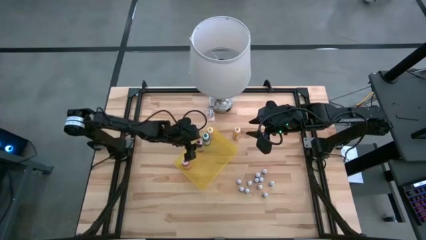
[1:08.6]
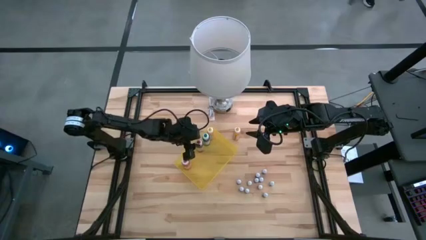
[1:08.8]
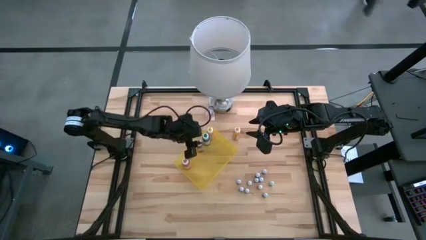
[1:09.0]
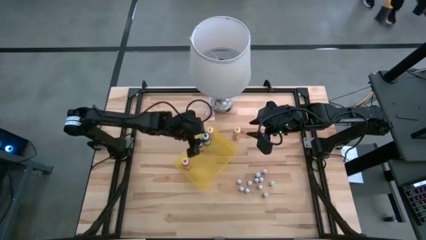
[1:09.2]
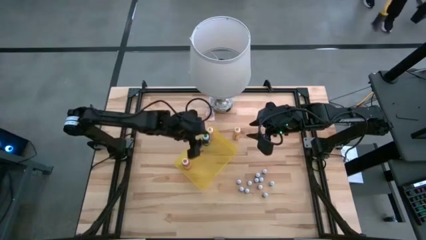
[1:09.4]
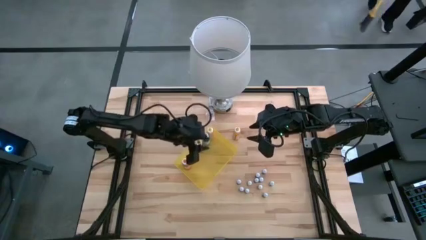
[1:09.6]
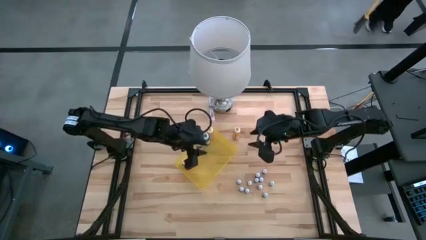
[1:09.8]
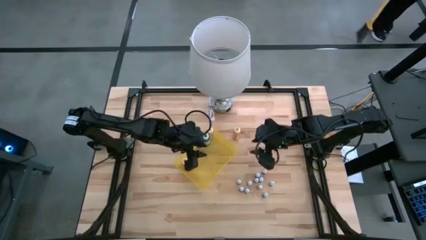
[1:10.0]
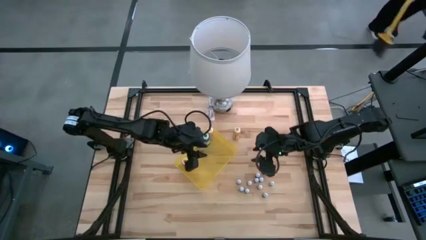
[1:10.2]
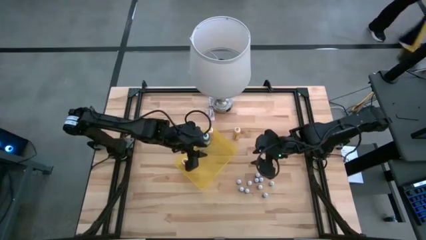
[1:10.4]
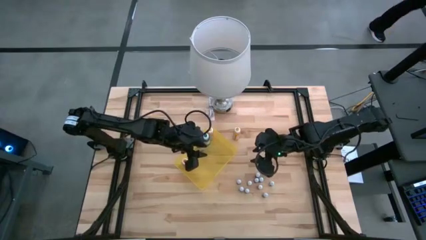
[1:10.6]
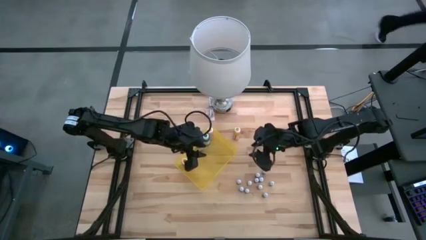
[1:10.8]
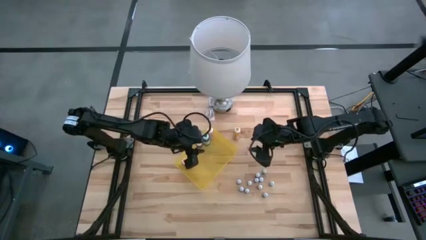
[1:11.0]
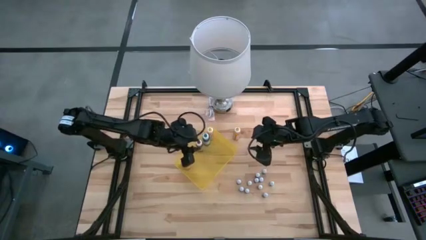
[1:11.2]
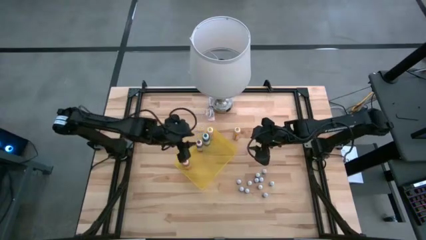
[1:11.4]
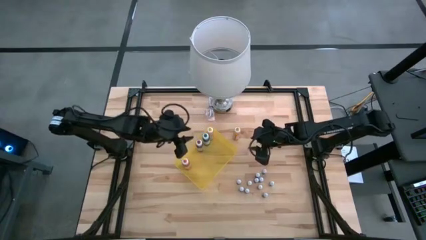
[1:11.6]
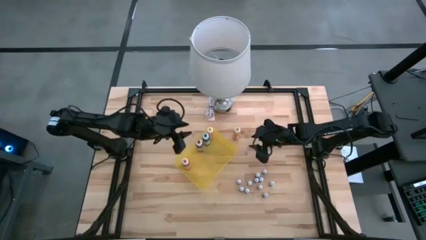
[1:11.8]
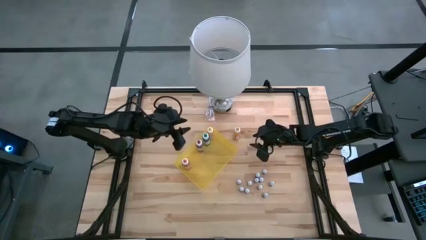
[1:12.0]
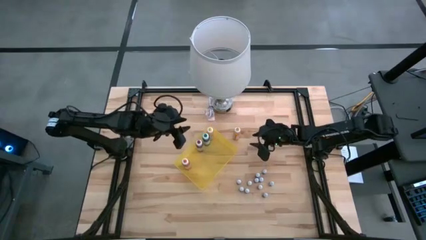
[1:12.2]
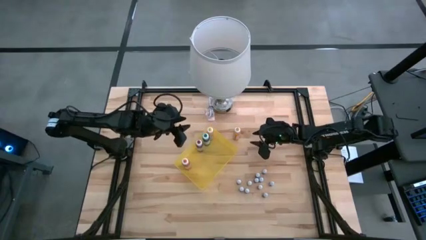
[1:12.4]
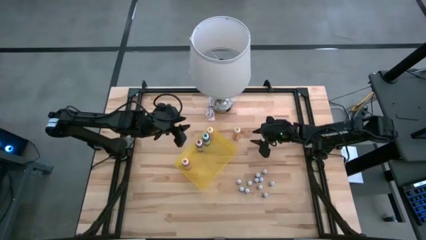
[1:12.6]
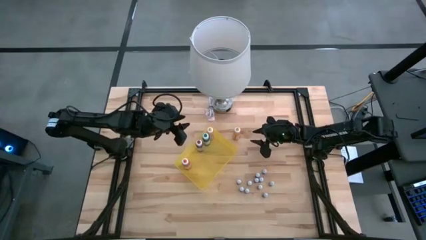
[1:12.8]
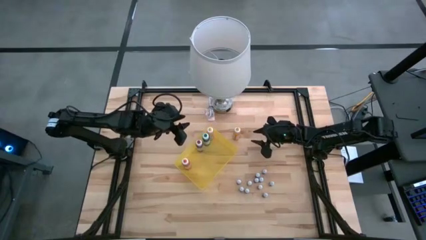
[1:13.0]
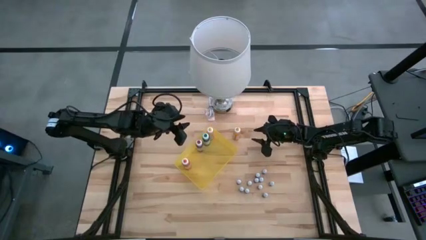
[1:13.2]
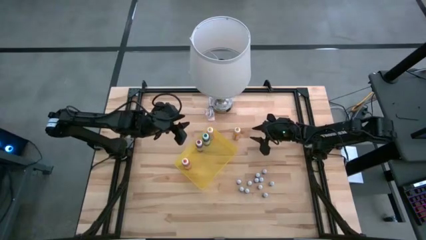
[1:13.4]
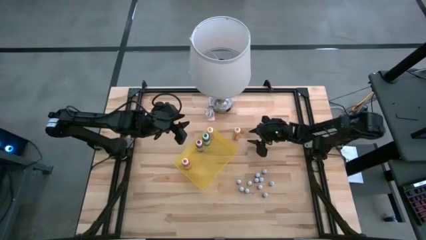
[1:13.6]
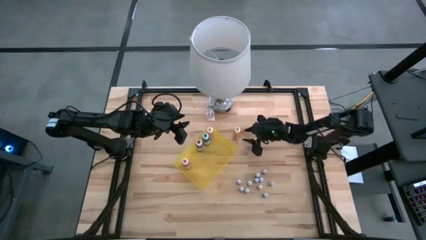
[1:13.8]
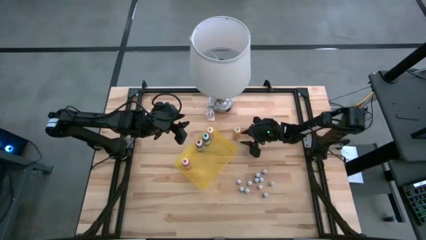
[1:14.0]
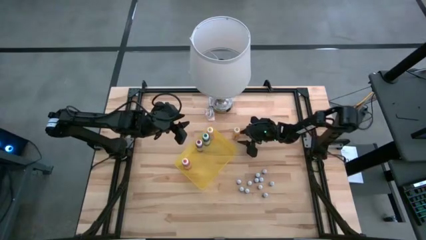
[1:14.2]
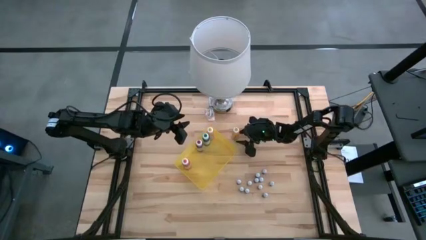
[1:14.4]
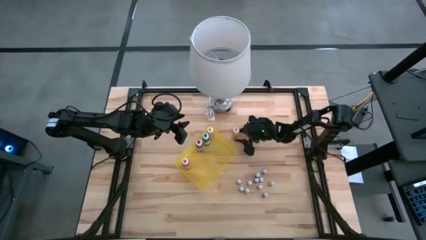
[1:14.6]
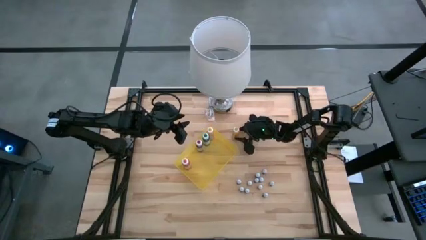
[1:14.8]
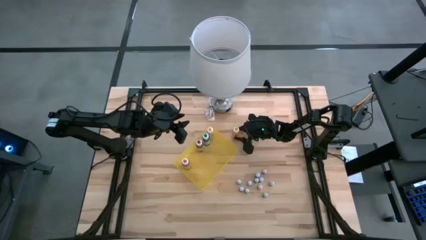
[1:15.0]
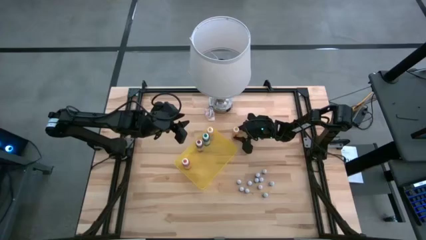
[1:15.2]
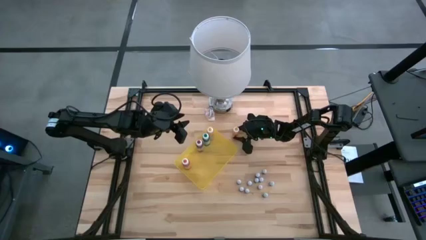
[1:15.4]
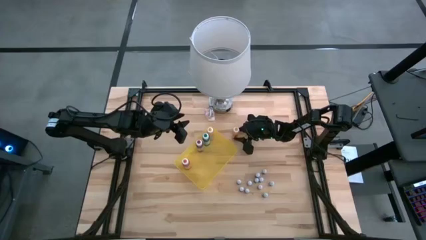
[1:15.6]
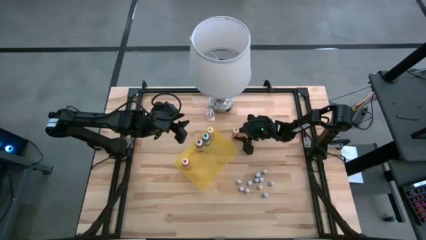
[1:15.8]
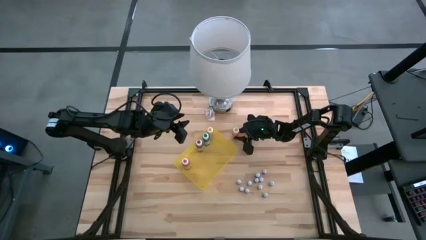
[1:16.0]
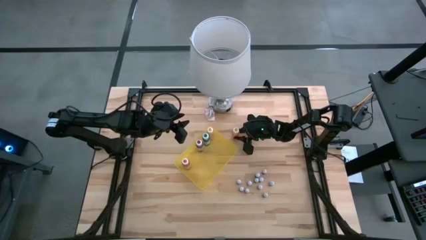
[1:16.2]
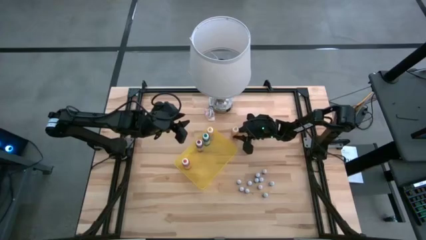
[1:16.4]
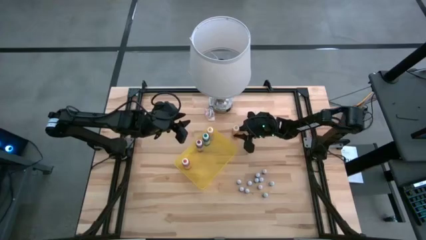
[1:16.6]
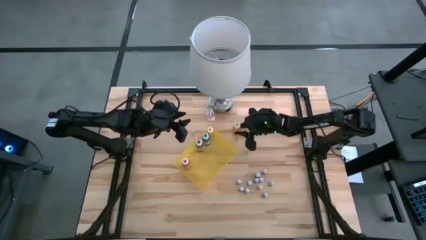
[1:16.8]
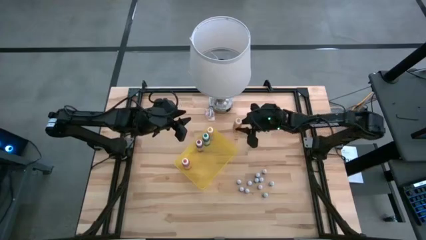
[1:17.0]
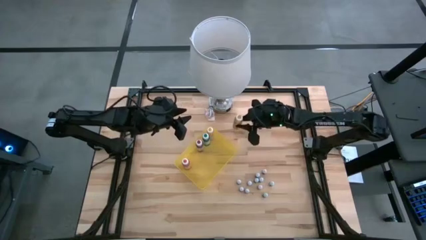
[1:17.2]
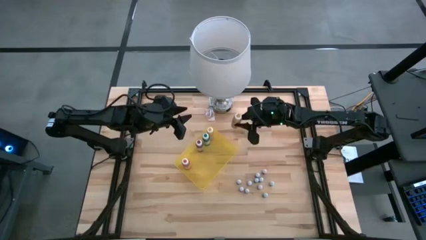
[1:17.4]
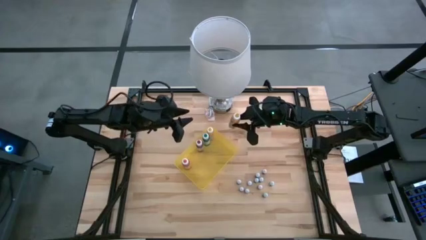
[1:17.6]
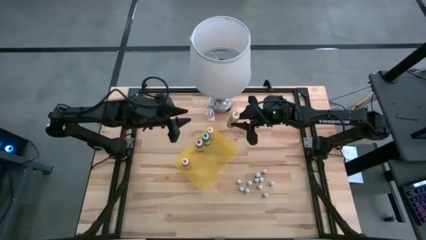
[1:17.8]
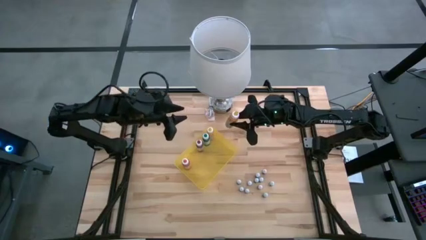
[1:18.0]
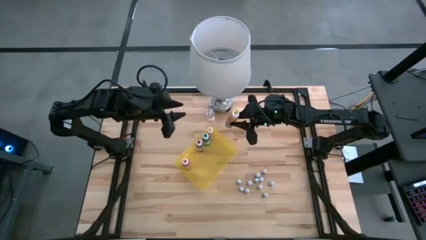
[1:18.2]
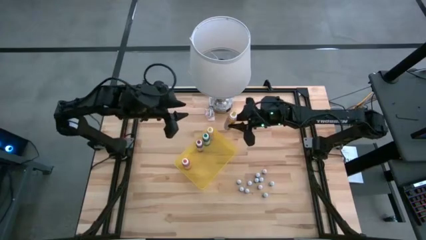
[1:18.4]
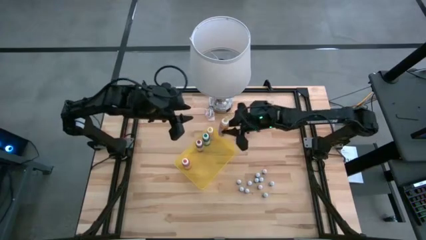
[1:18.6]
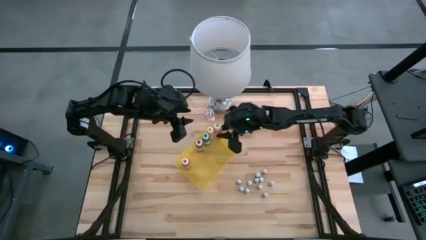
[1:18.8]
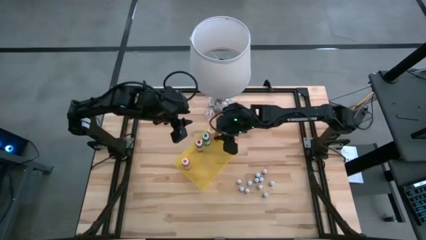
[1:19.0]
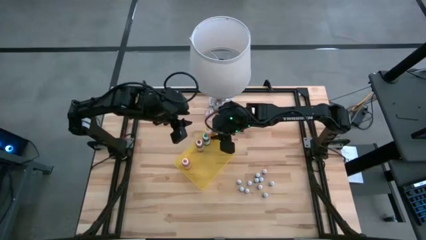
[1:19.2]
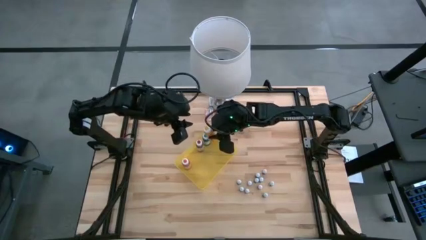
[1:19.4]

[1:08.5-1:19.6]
Task: Pick & Place food coloring
Put the large yellow food coloring bottle into the yellow bin

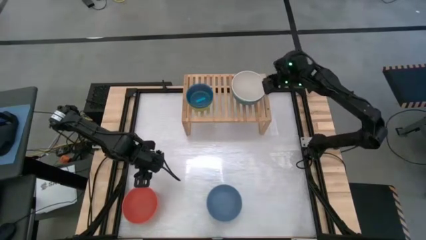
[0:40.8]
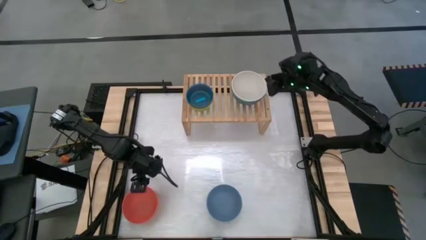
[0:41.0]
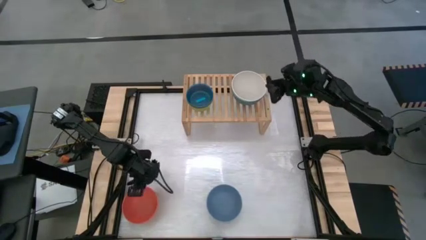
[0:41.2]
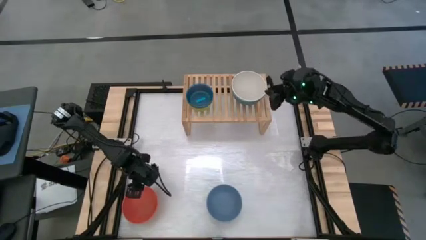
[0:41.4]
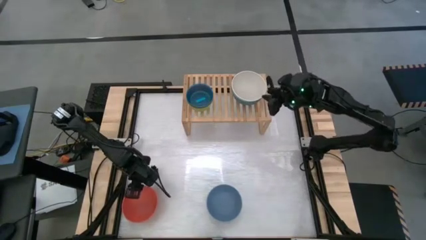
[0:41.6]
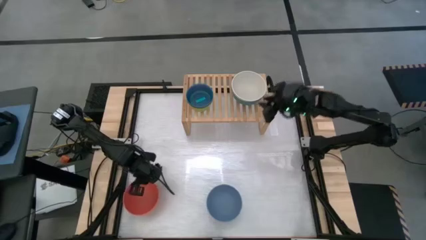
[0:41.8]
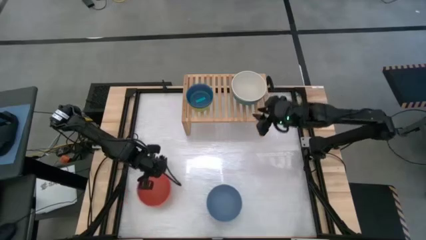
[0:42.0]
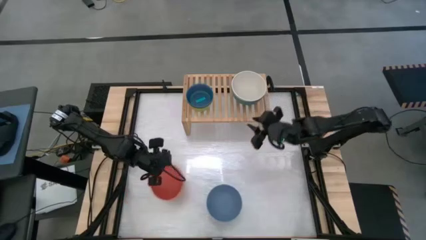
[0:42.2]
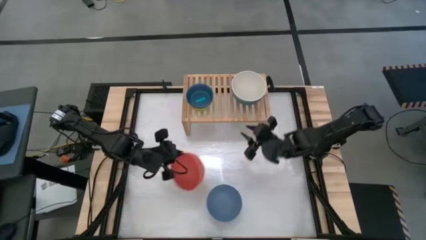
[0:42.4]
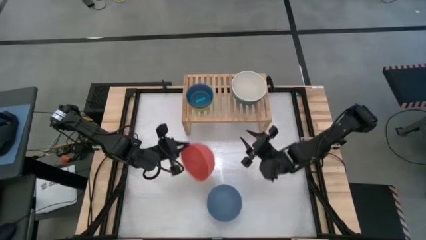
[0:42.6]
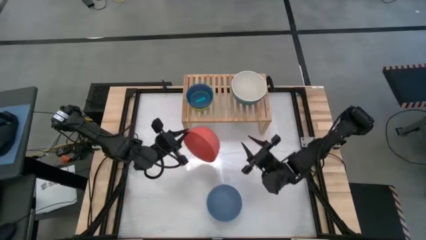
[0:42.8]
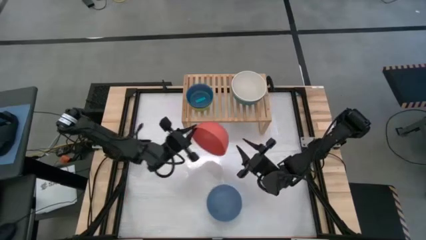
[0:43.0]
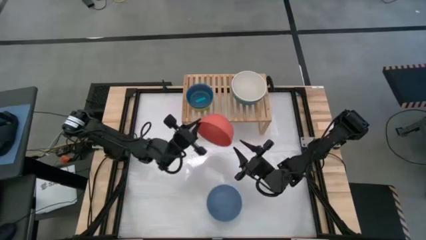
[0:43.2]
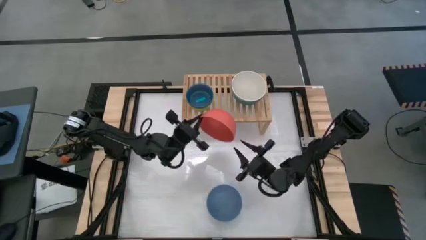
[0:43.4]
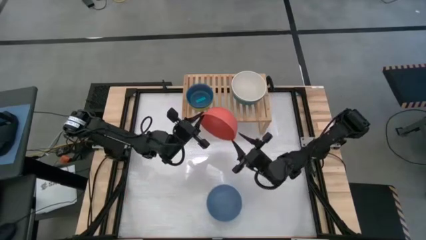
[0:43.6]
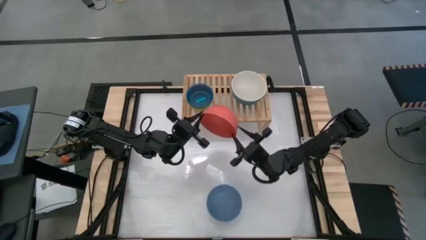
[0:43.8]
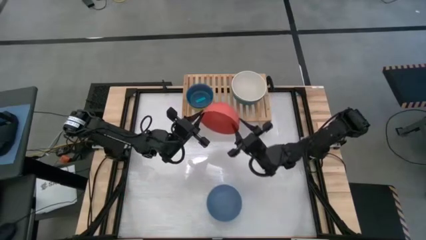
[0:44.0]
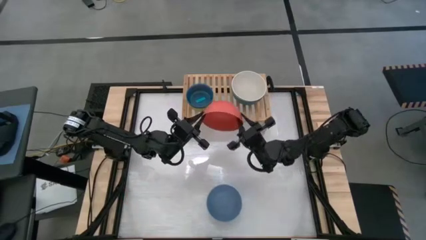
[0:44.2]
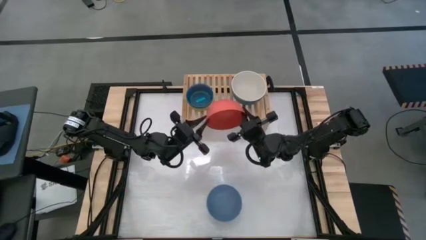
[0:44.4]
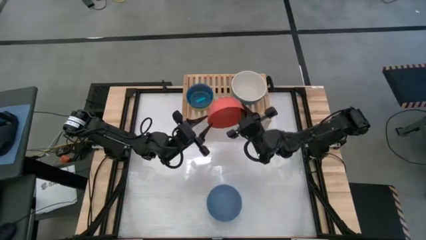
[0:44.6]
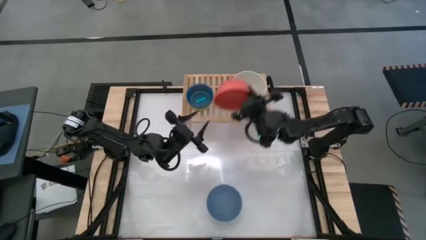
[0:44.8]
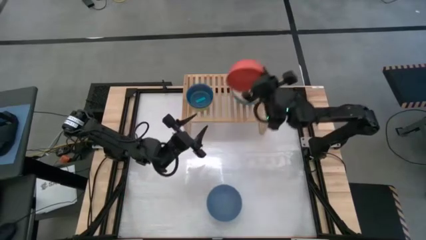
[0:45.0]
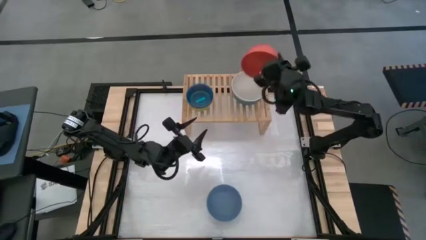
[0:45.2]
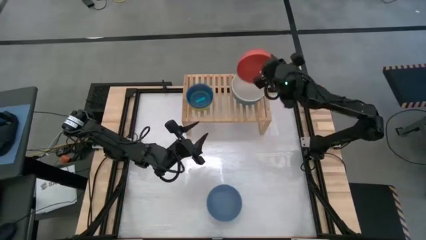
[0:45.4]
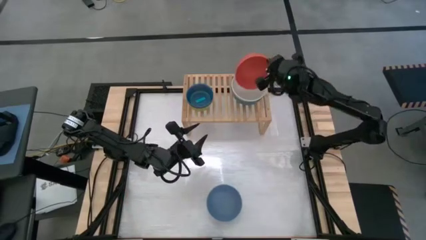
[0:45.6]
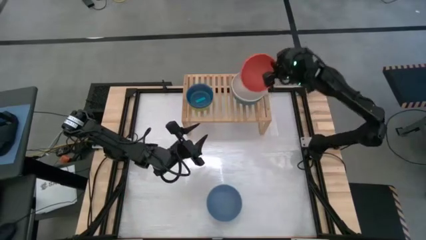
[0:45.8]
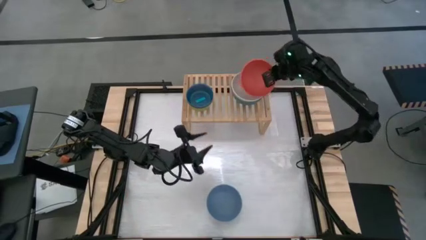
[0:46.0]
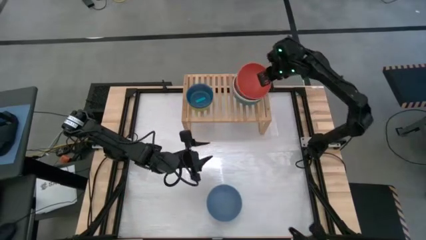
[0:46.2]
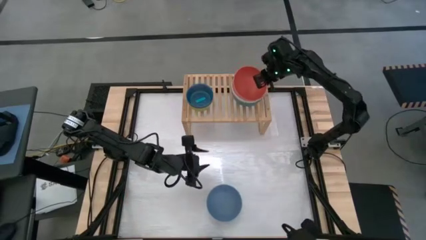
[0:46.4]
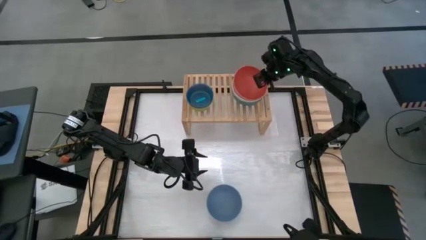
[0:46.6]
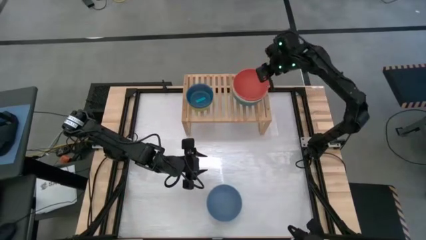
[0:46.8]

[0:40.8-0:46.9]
Task: Place and stack bowls onto a shelf
Stack the orange bowl on top of the white bowls on hte shelf
